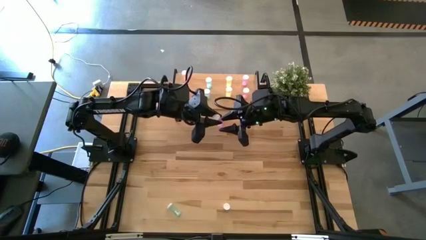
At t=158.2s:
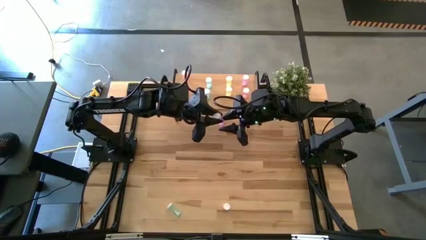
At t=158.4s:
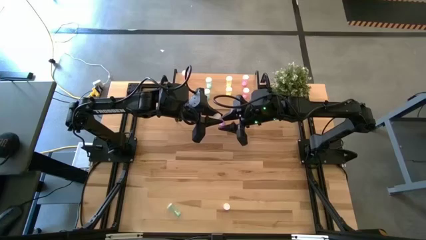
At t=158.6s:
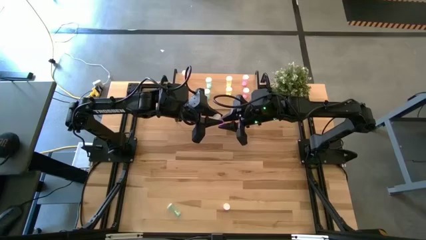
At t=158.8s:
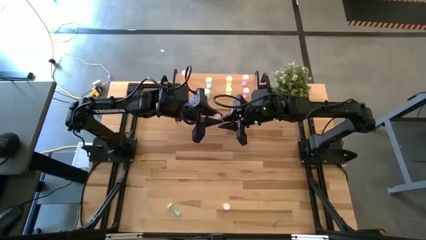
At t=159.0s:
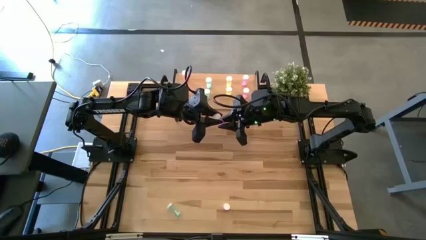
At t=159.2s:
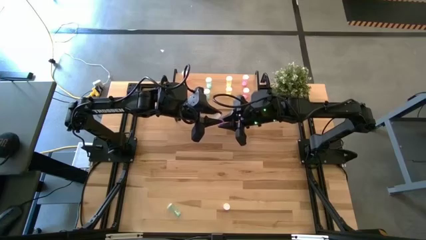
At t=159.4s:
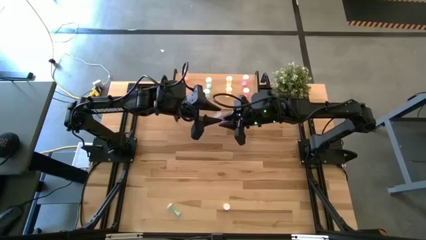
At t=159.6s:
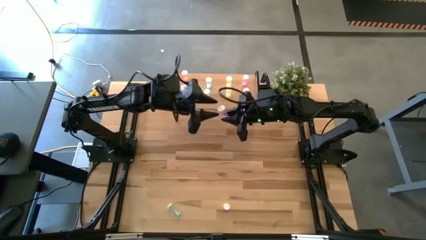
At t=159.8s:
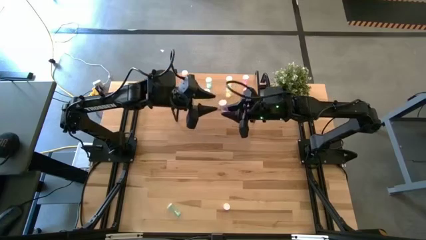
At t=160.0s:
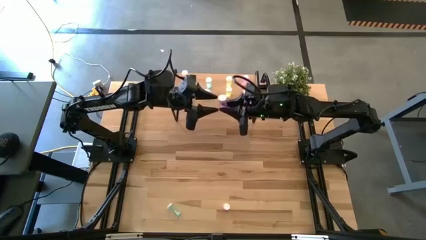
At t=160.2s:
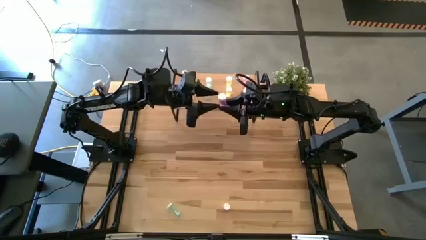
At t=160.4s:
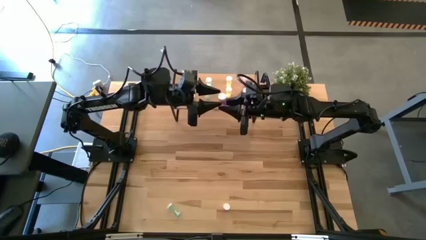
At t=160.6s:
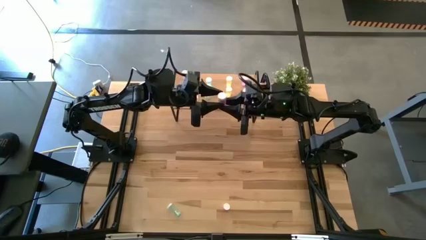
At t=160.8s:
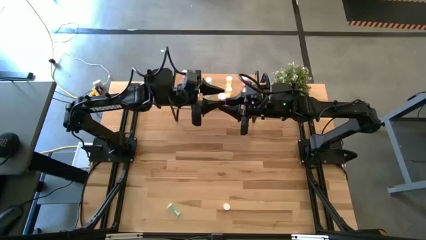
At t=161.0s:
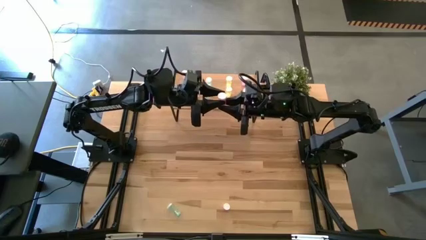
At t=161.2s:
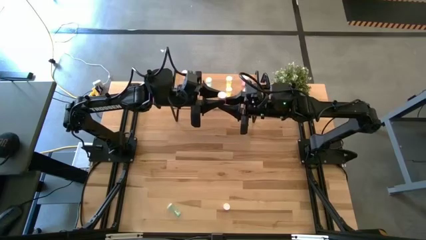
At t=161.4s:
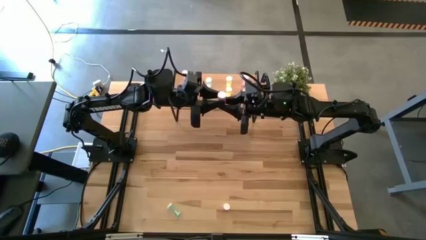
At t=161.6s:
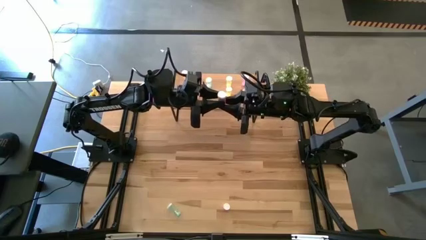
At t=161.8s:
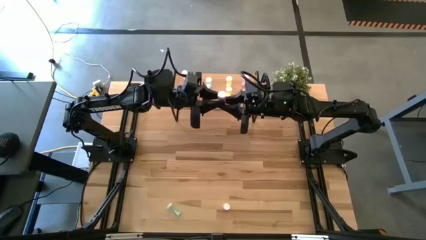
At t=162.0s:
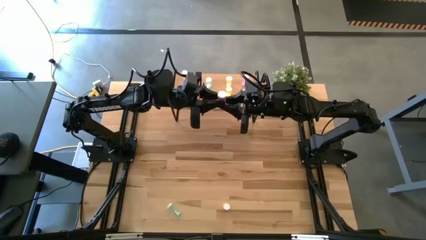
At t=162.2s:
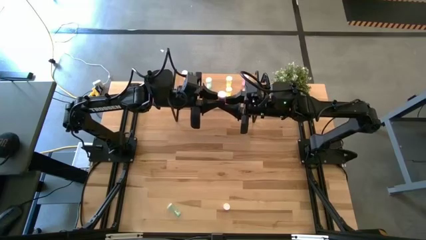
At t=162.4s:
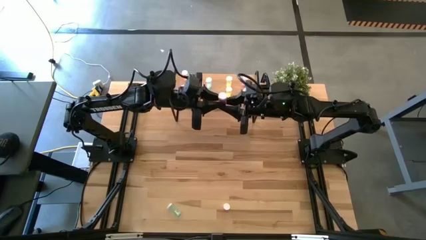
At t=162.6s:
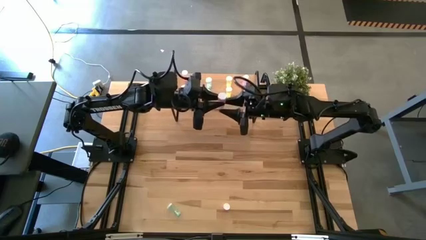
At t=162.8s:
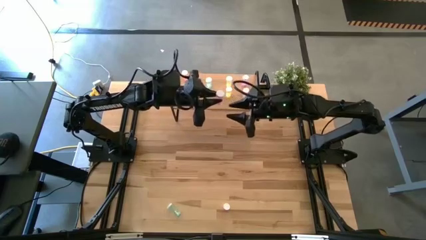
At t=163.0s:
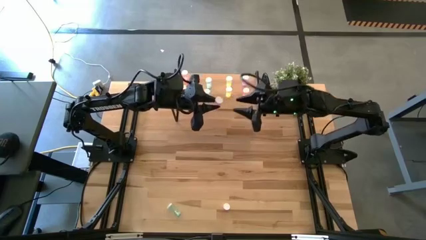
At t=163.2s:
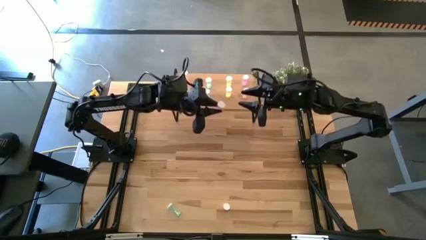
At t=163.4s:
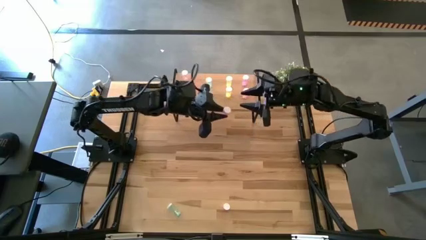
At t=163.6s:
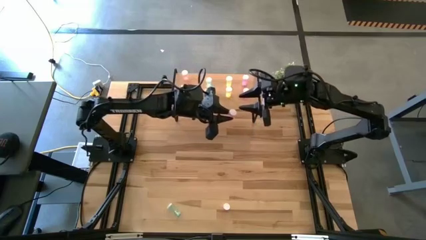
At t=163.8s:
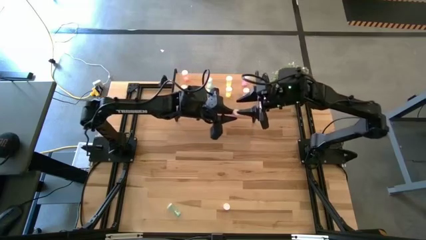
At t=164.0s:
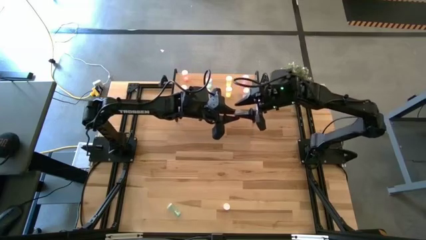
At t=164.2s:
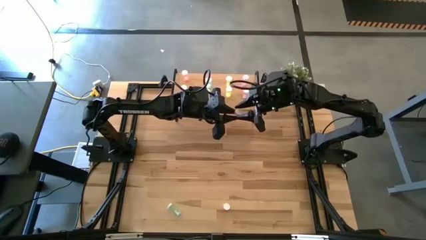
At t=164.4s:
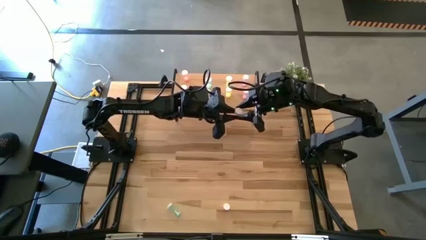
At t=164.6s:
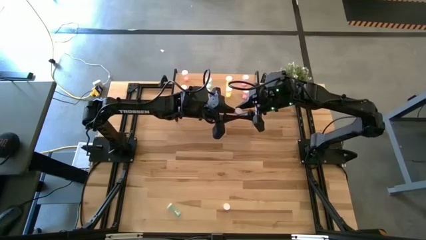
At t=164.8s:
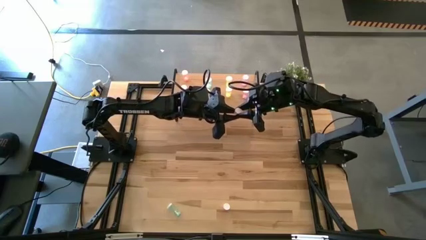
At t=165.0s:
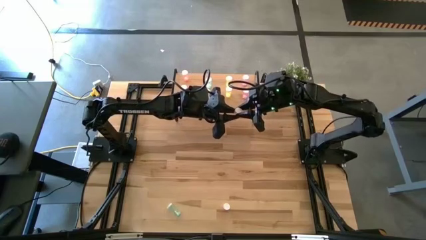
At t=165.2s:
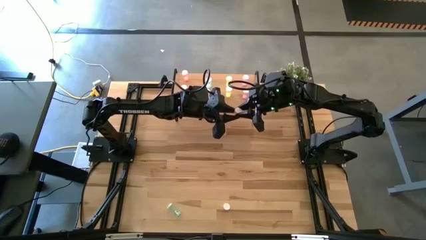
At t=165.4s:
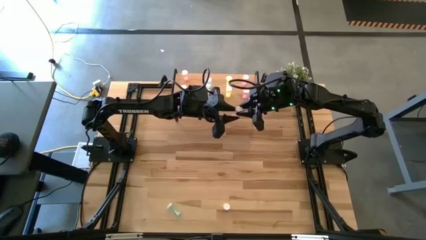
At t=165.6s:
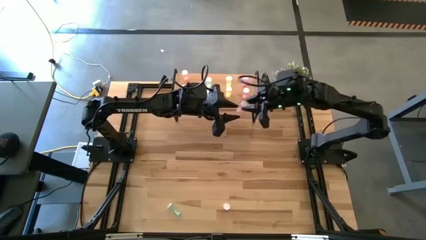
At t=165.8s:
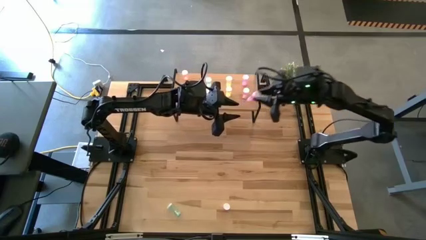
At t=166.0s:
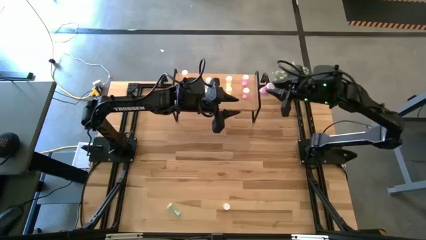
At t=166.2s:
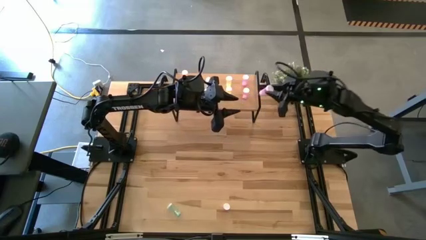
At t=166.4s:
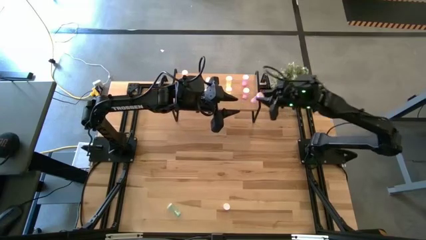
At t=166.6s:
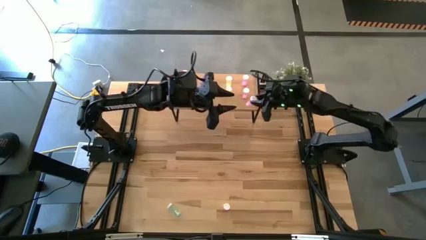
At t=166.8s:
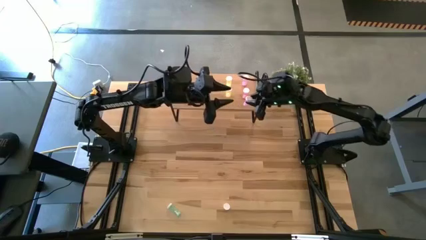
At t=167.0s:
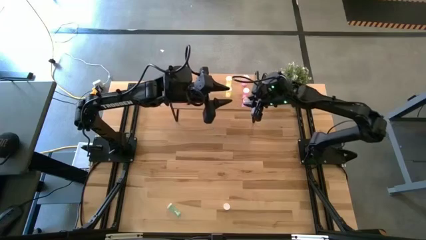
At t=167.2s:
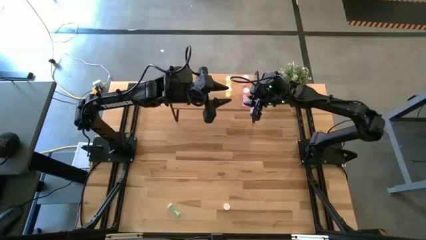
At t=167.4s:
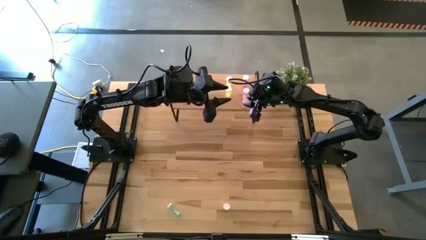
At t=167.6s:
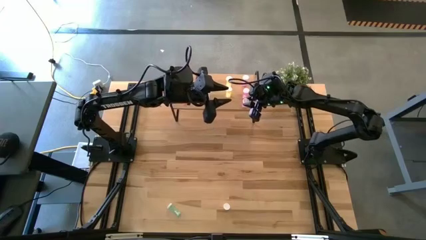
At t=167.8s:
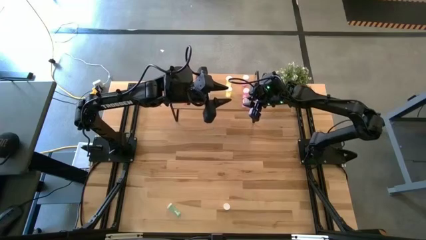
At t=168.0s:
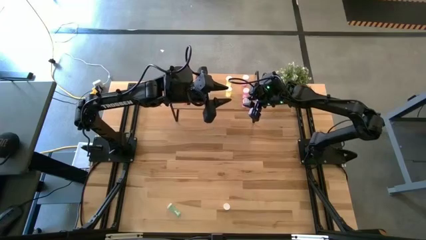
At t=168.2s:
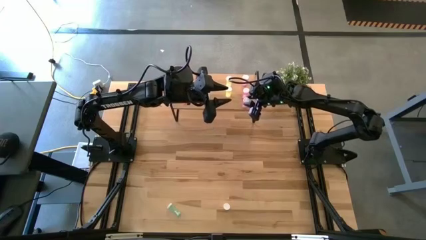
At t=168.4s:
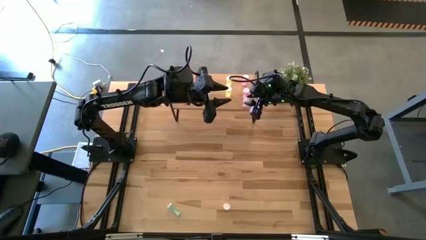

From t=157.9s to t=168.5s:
Task: Pick and place medicine bottles onto shelf by color
Put the purple pill bottle on the shelf aligned with the other purple pill bottle
